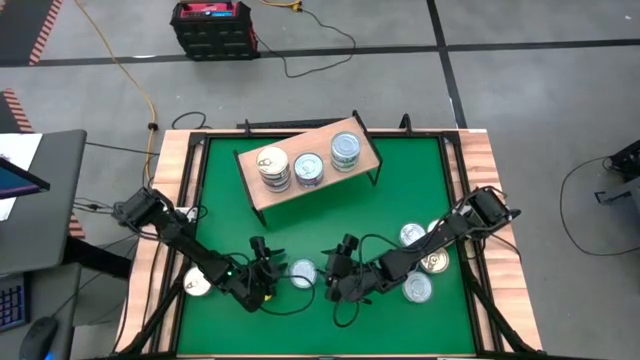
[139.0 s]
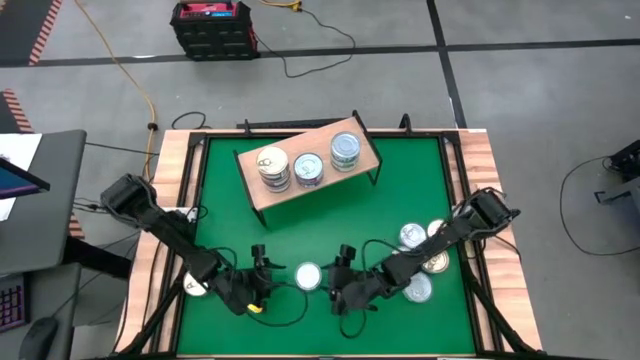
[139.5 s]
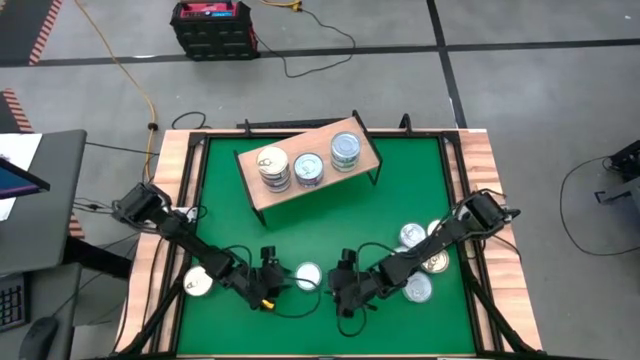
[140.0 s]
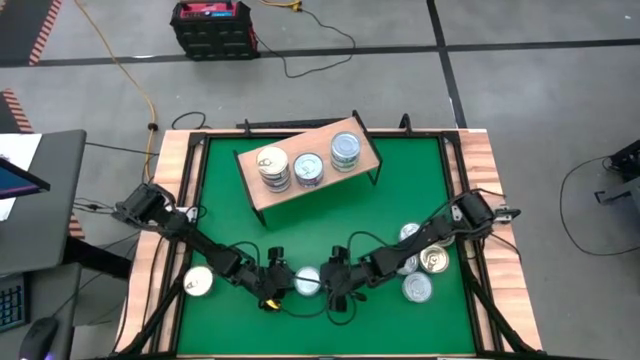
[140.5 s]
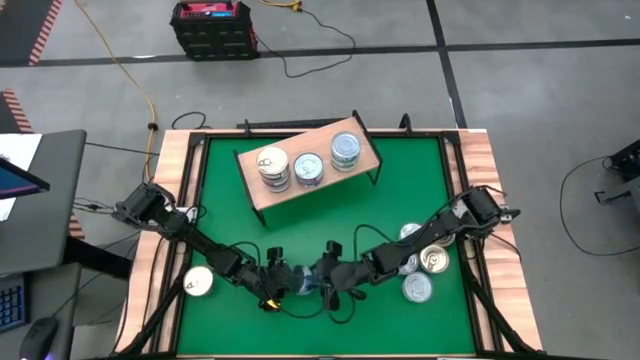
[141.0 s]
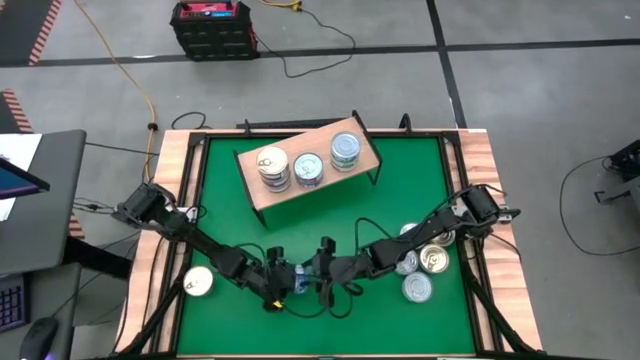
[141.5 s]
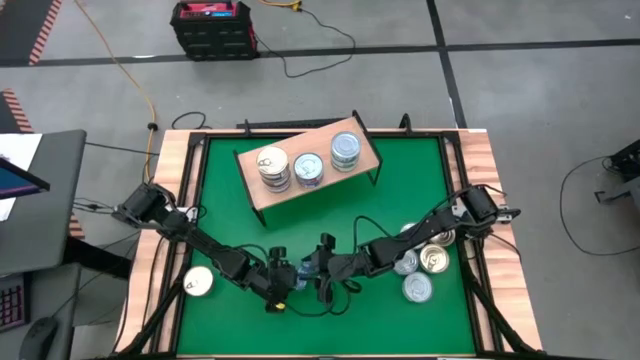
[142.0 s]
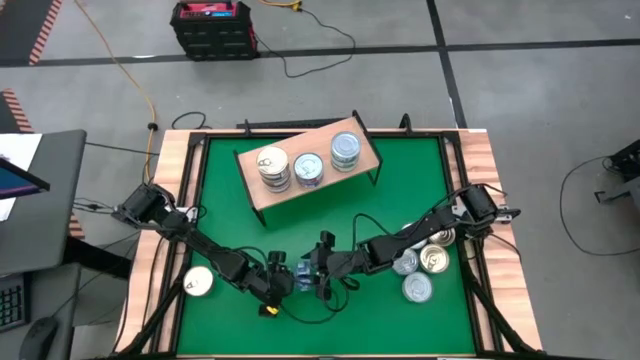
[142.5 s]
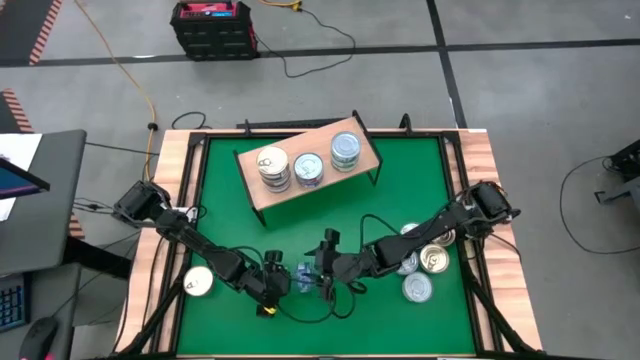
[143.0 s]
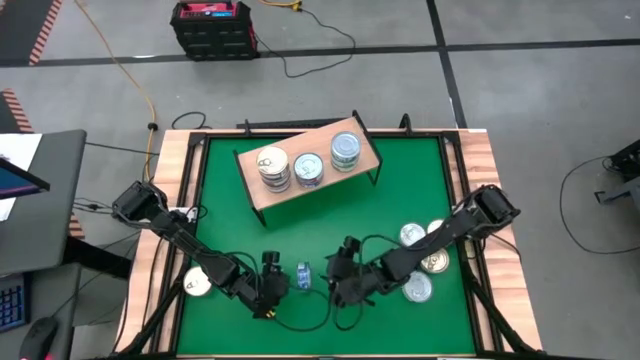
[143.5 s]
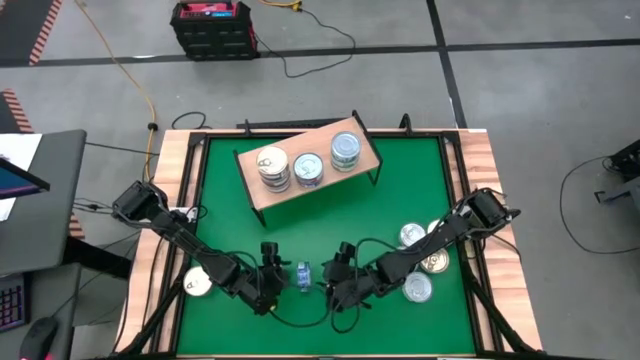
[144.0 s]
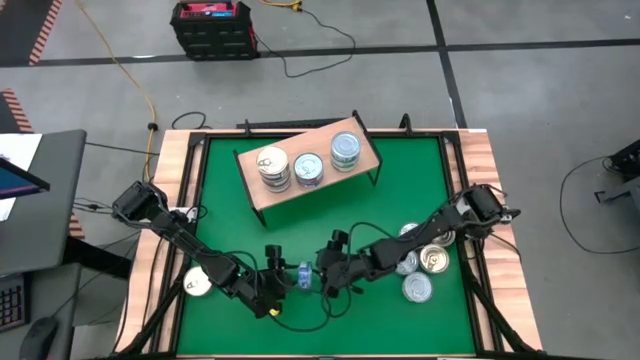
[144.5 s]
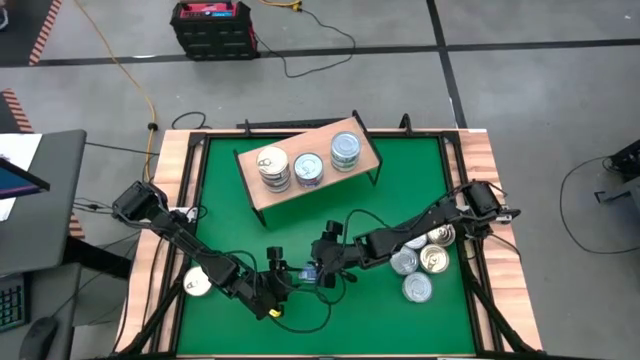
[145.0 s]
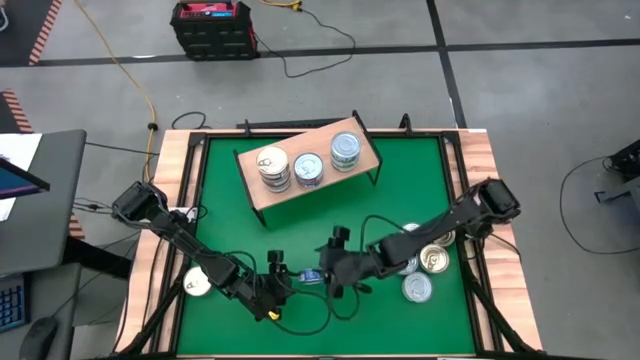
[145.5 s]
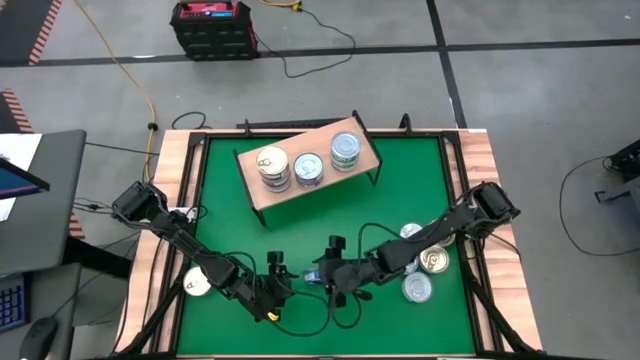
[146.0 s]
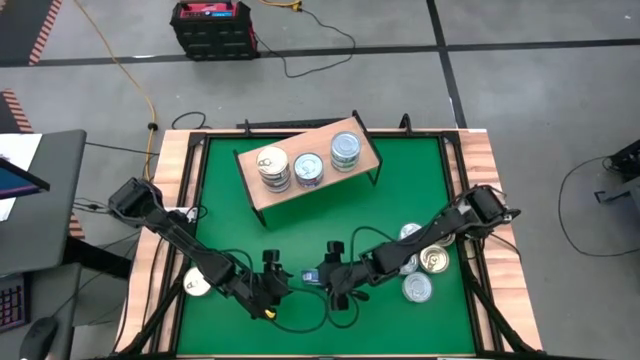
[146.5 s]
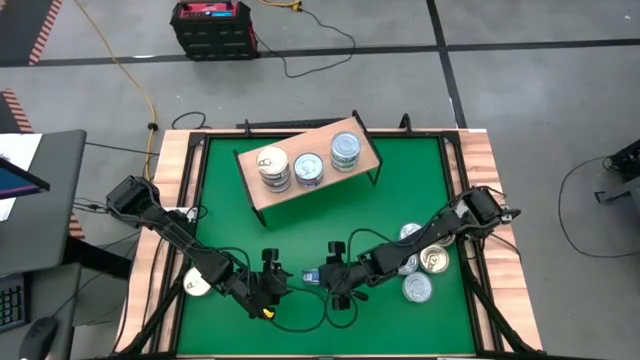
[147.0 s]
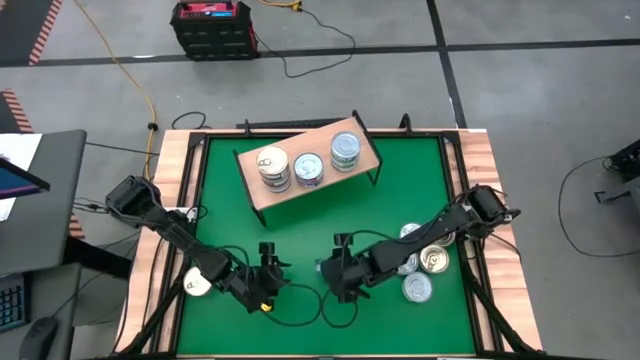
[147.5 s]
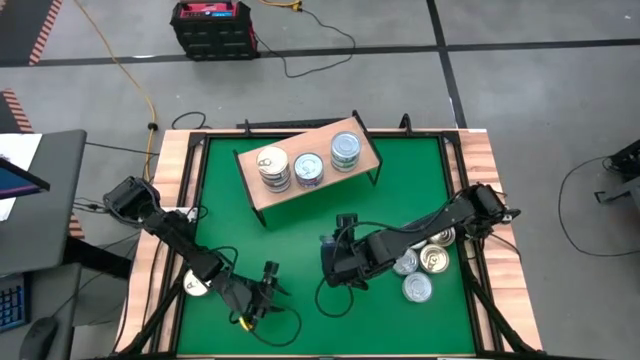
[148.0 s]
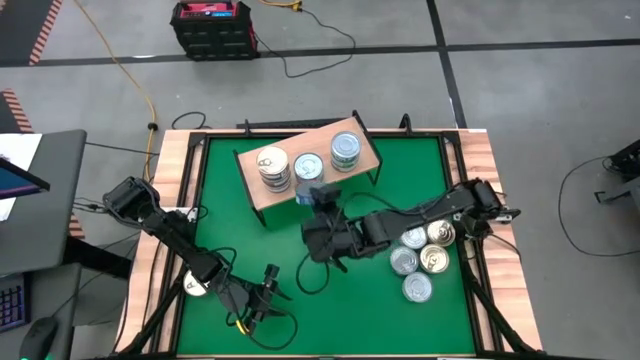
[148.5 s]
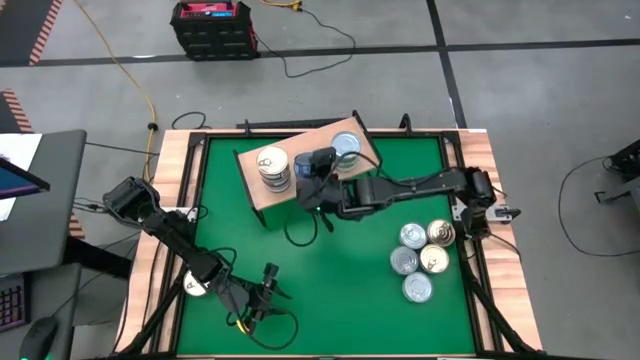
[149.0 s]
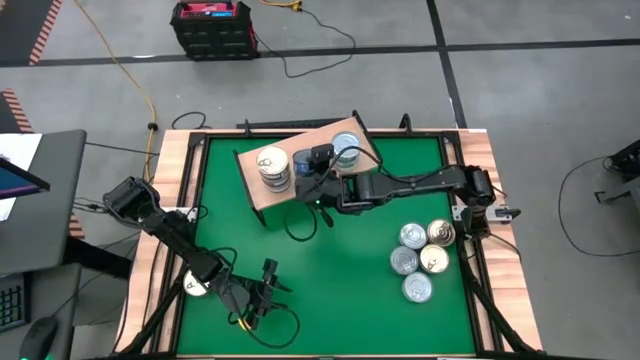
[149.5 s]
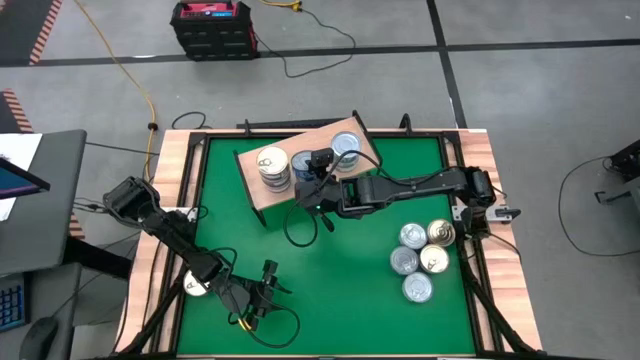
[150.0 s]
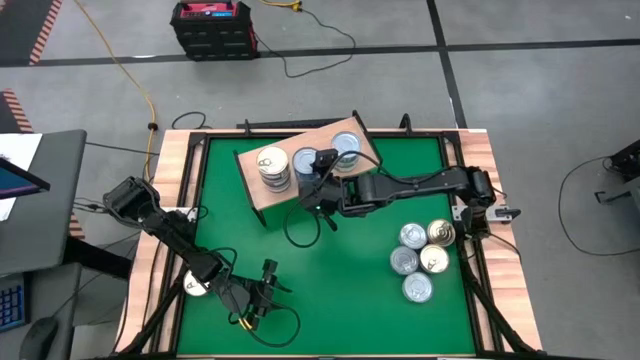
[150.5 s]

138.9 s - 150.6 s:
Task: Stack canned seafood by type on shelf
Stack the blue tuna can on top of the red tuna can on the shelf

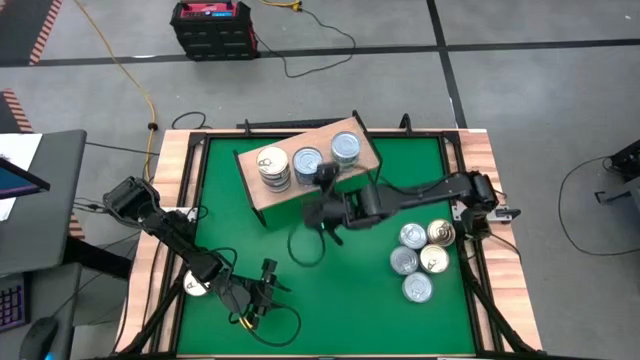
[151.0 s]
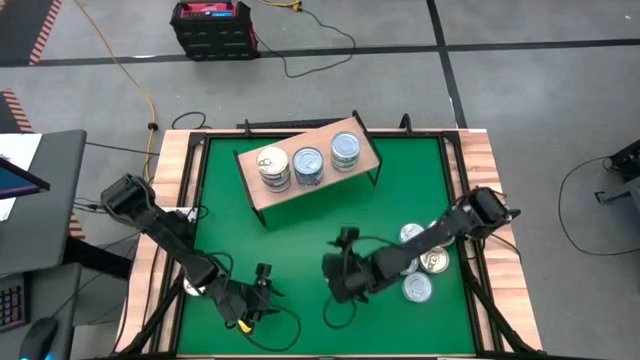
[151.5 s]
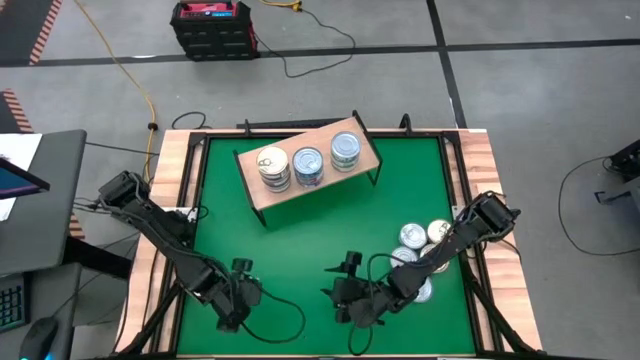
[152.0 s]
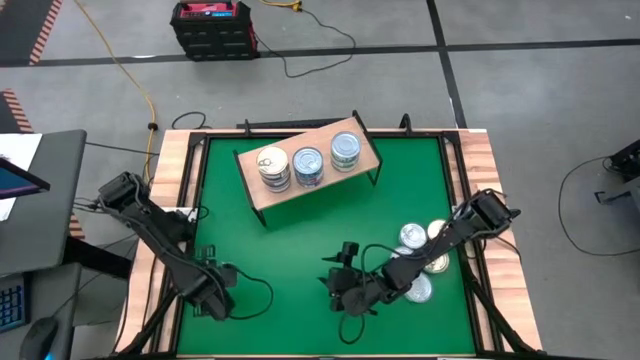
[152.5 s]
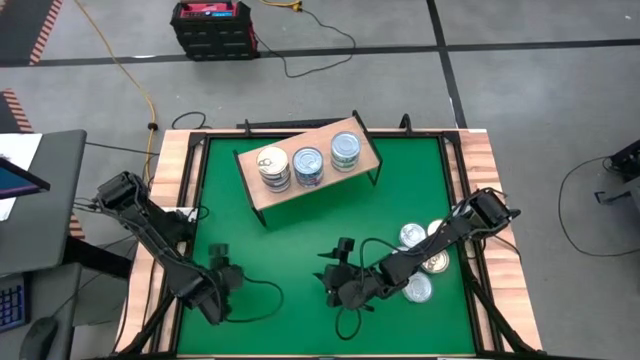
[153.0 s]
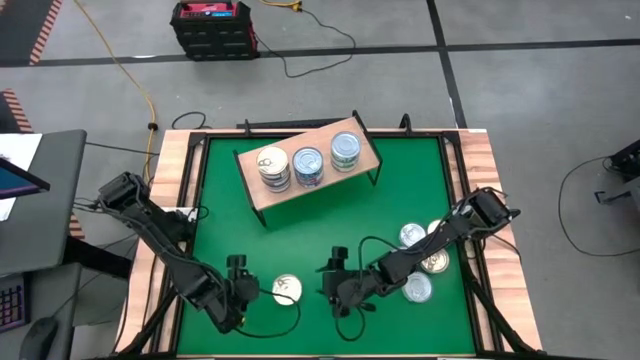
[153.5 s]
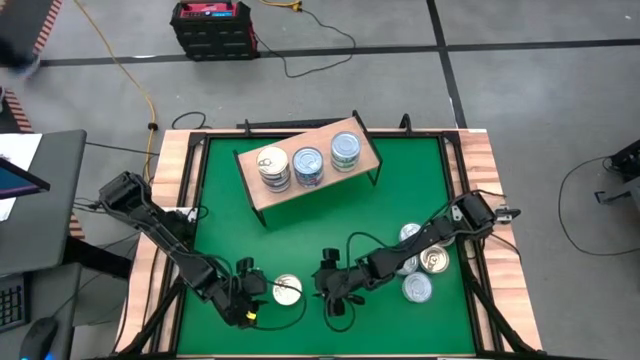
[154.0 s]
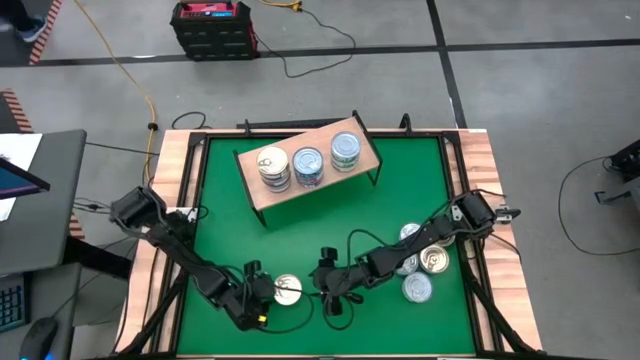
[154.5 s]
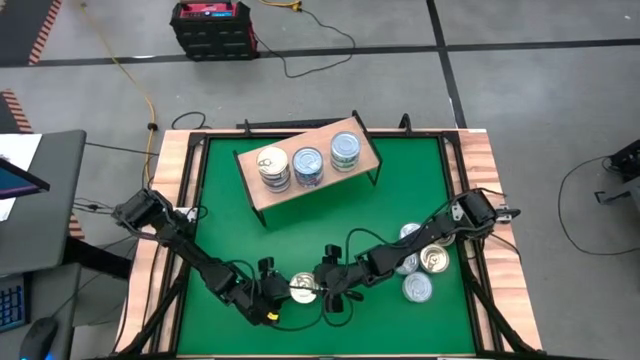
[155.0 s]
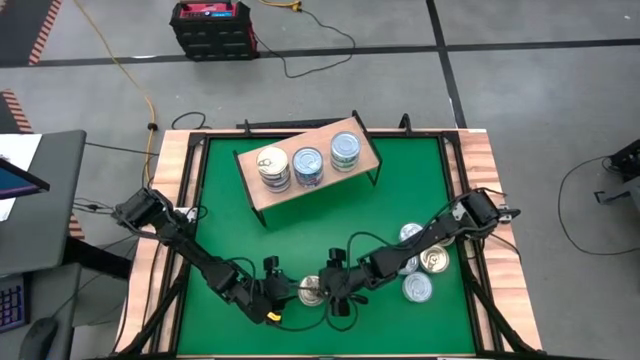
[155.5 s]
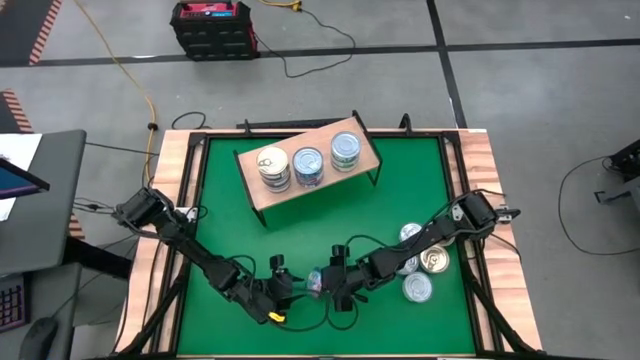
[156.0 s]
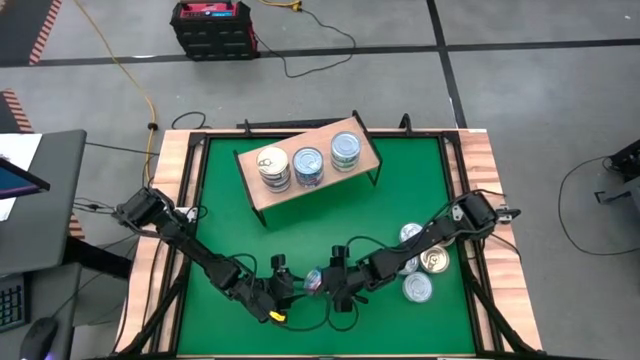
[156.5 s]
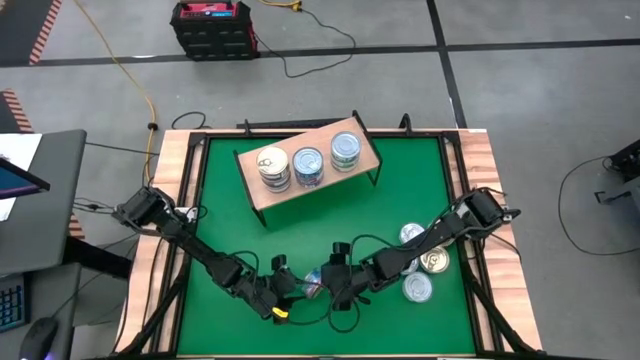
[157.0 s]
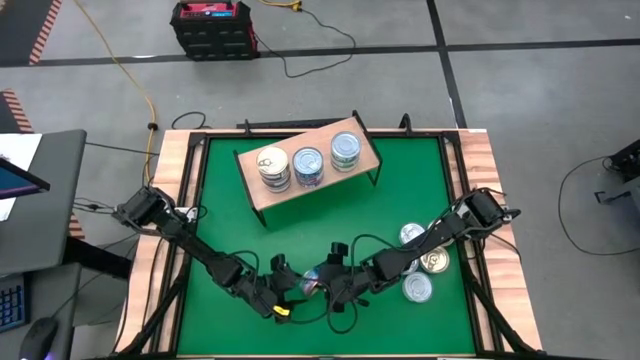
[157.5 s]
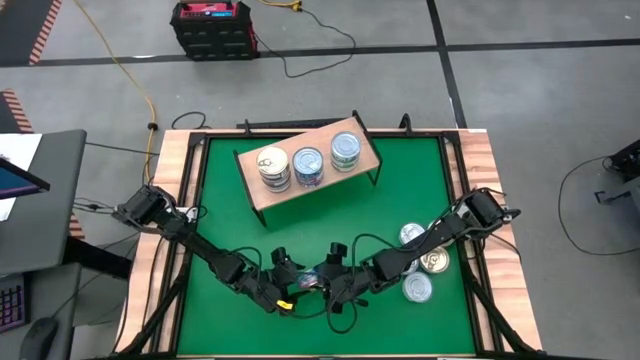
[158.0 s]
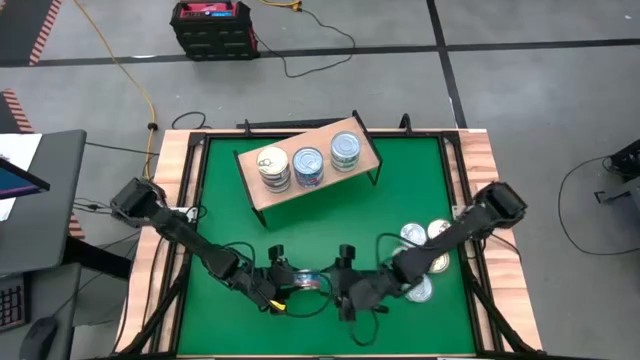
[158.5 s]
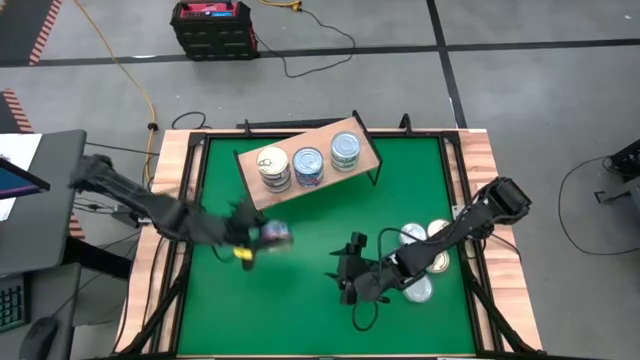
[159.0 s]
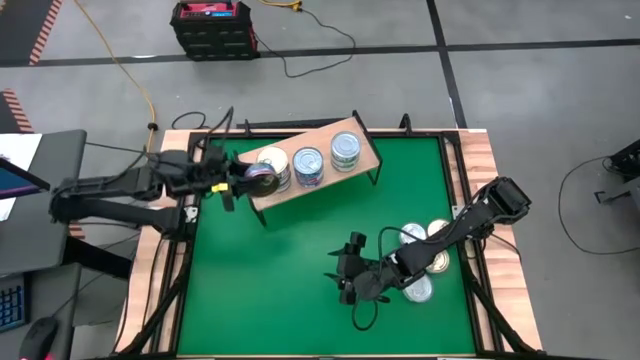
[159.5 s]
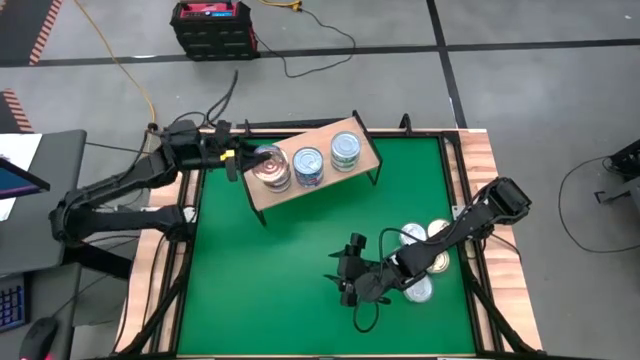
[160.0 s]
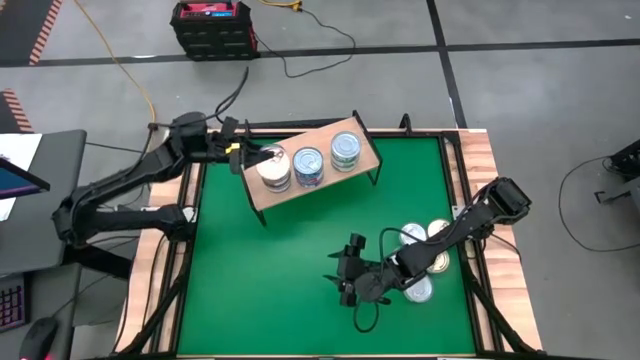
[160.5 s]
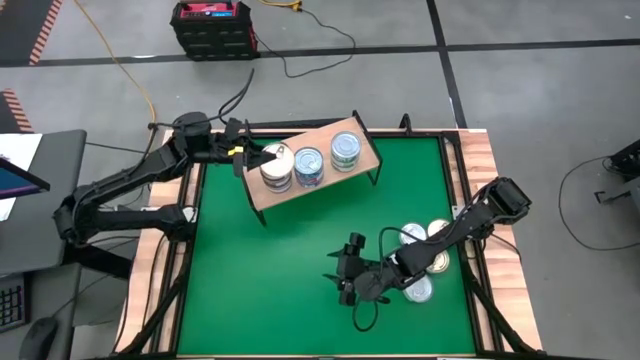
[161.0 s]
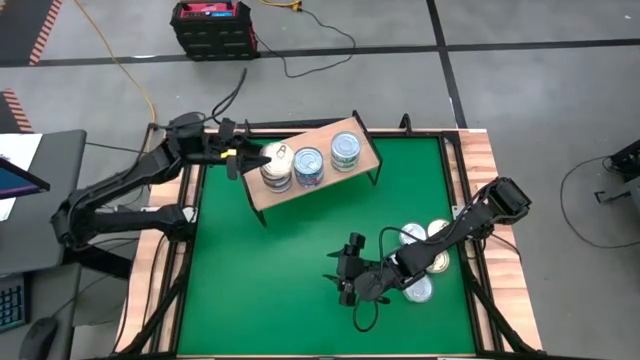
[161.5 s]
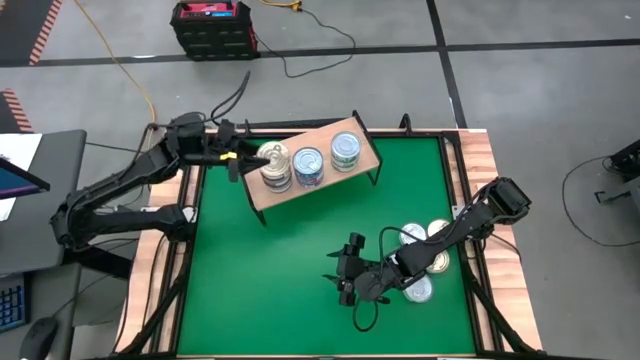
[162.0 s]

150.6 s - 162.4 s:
Stack the blue pink tuna can on top of the blue pink tuna can on the shelf
